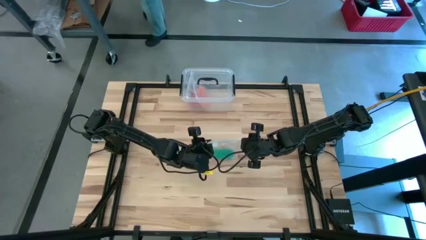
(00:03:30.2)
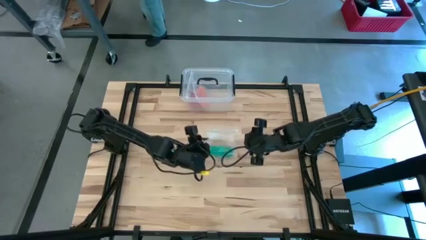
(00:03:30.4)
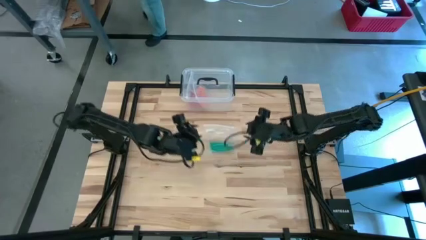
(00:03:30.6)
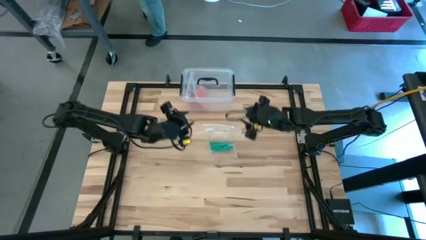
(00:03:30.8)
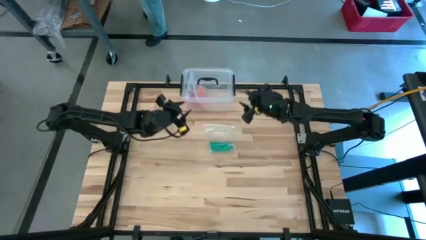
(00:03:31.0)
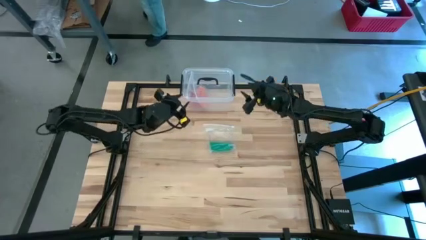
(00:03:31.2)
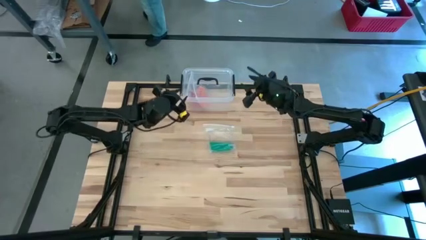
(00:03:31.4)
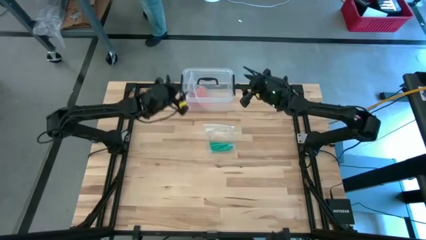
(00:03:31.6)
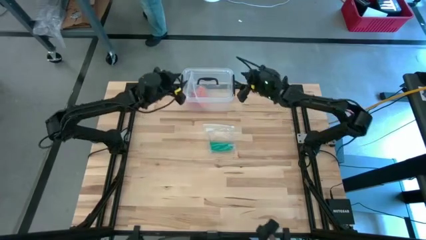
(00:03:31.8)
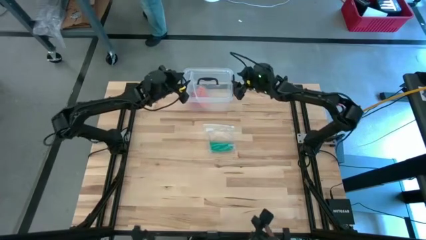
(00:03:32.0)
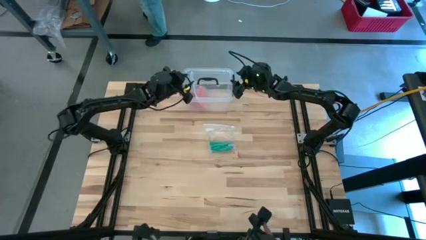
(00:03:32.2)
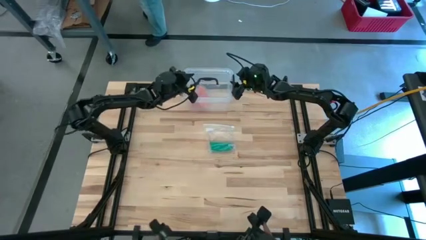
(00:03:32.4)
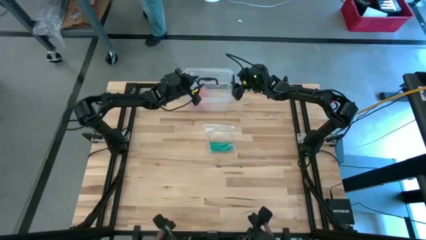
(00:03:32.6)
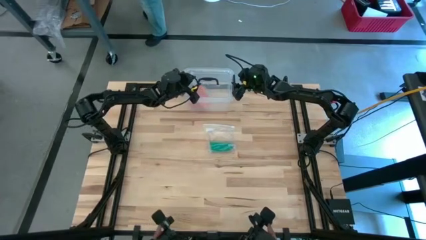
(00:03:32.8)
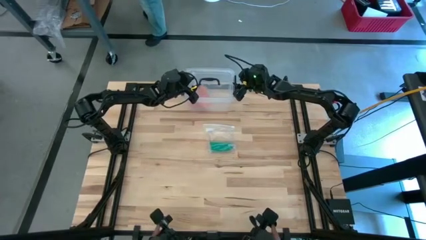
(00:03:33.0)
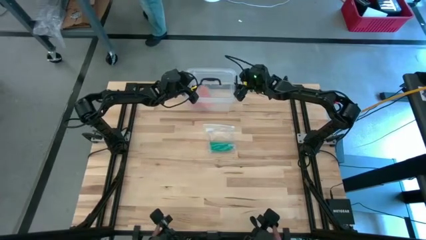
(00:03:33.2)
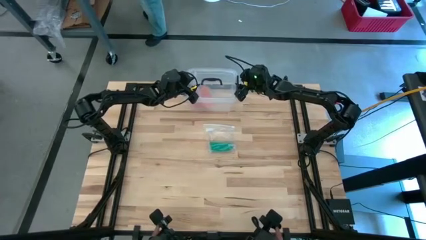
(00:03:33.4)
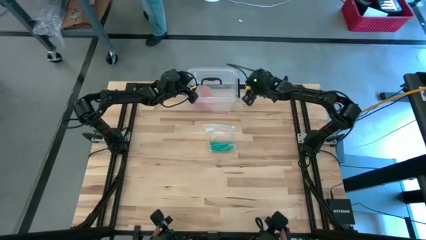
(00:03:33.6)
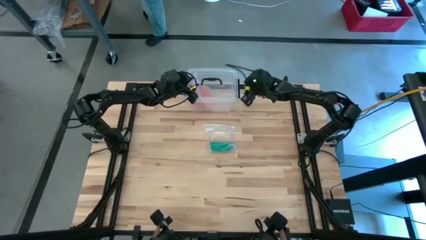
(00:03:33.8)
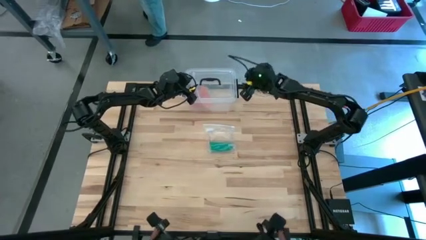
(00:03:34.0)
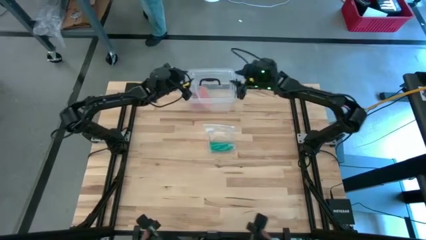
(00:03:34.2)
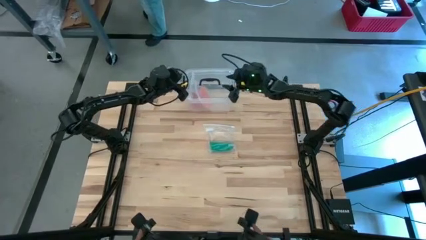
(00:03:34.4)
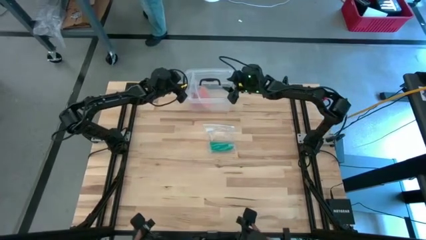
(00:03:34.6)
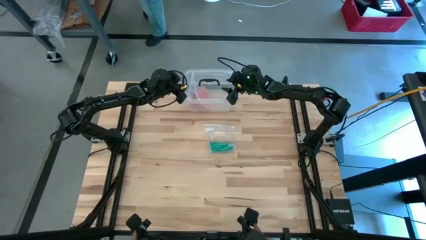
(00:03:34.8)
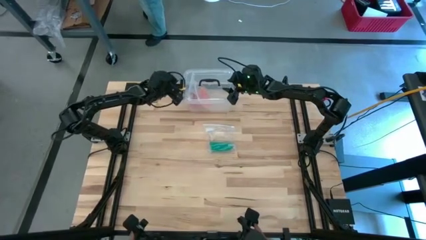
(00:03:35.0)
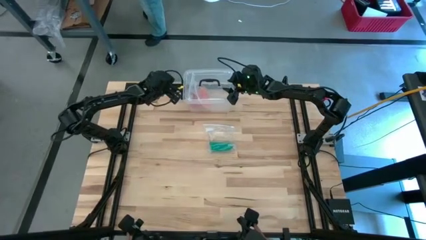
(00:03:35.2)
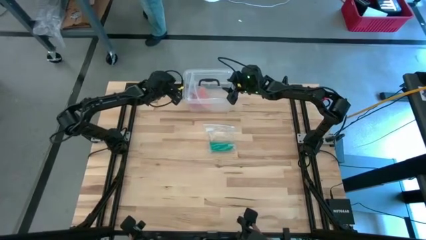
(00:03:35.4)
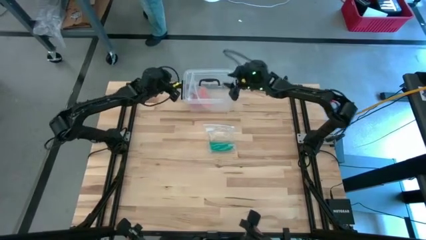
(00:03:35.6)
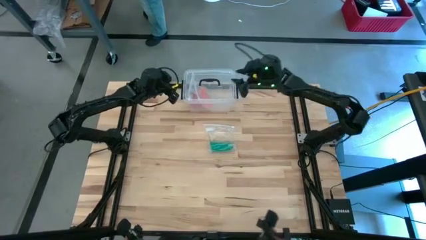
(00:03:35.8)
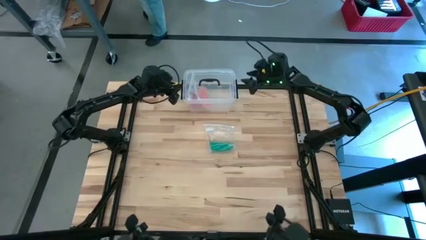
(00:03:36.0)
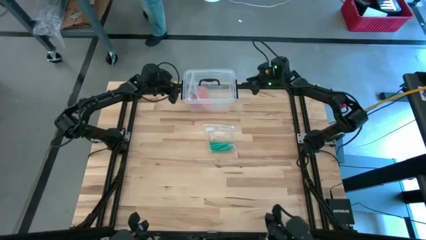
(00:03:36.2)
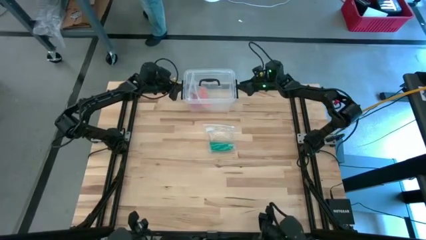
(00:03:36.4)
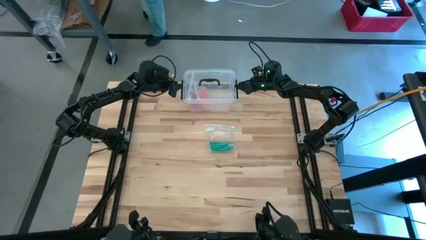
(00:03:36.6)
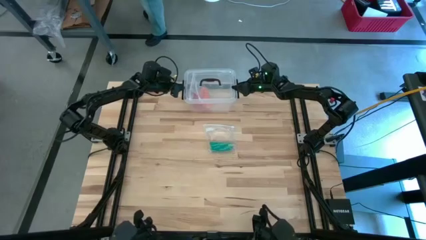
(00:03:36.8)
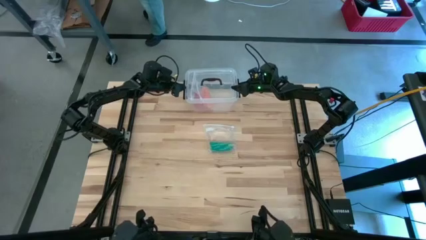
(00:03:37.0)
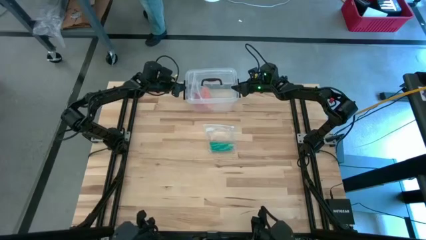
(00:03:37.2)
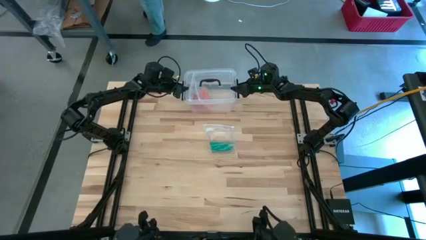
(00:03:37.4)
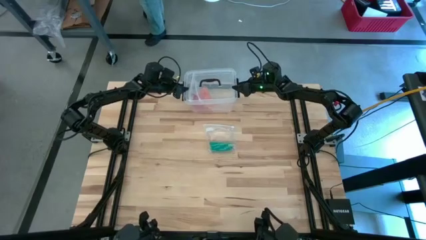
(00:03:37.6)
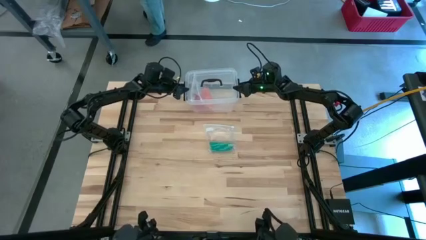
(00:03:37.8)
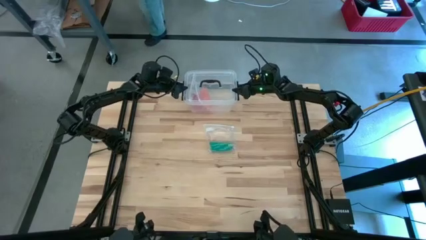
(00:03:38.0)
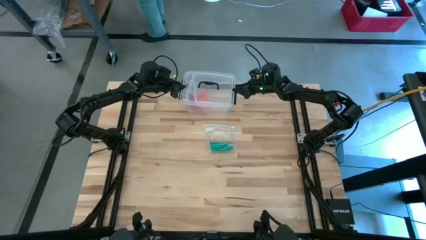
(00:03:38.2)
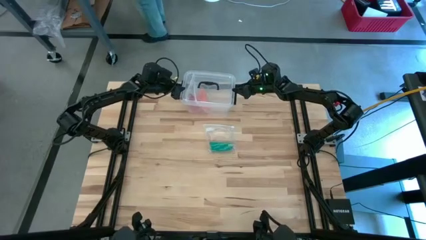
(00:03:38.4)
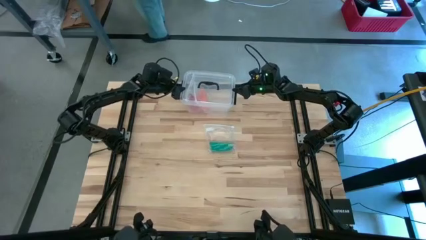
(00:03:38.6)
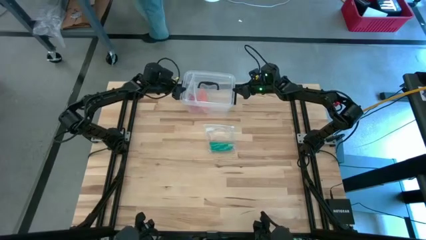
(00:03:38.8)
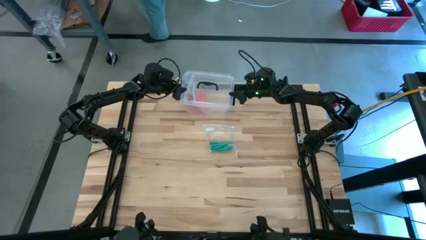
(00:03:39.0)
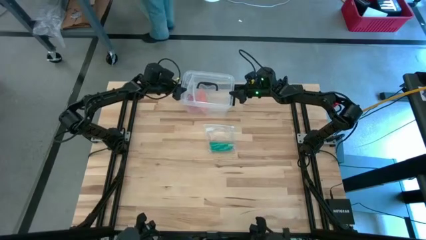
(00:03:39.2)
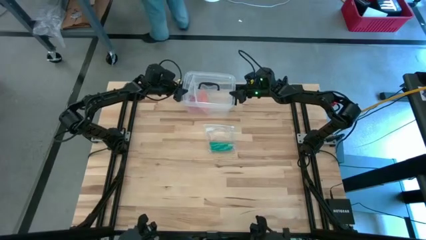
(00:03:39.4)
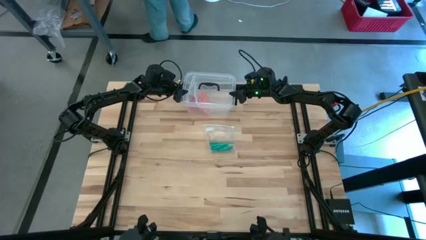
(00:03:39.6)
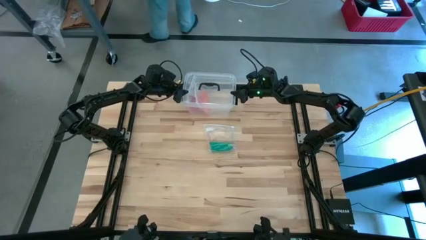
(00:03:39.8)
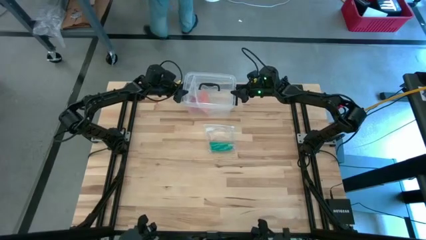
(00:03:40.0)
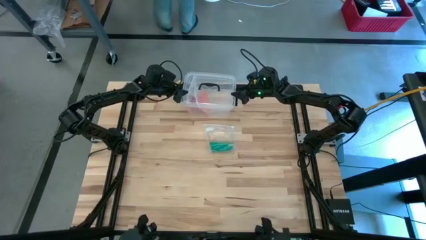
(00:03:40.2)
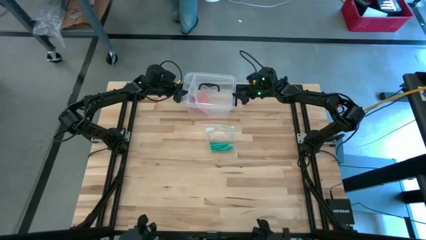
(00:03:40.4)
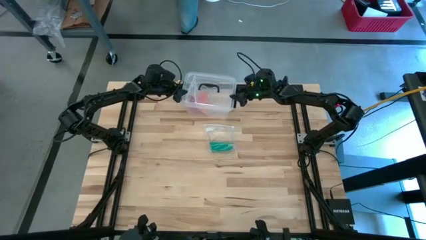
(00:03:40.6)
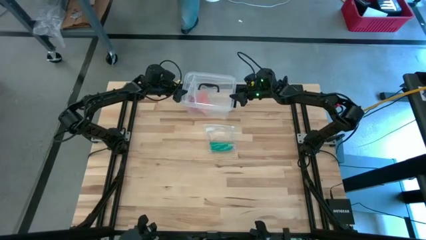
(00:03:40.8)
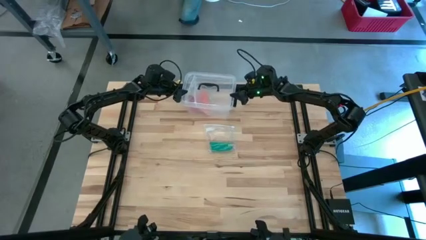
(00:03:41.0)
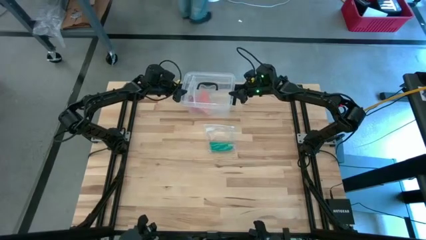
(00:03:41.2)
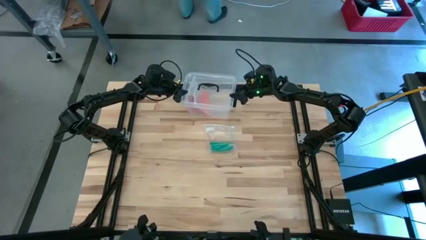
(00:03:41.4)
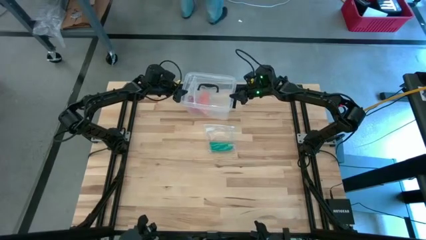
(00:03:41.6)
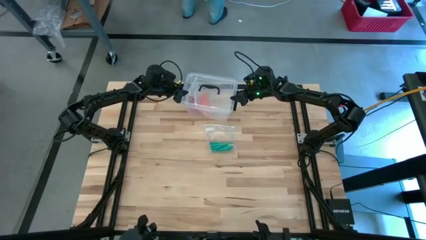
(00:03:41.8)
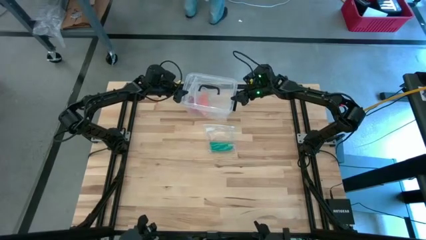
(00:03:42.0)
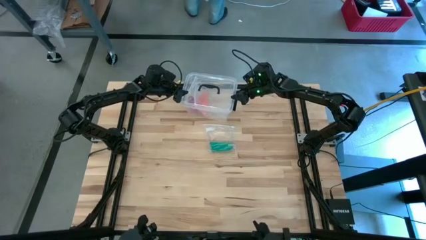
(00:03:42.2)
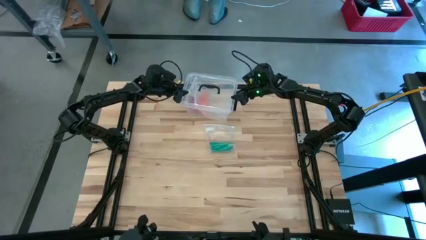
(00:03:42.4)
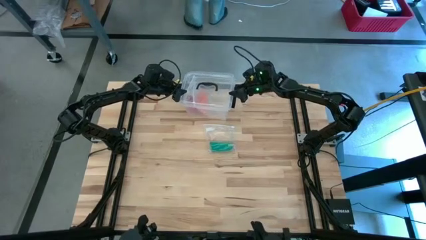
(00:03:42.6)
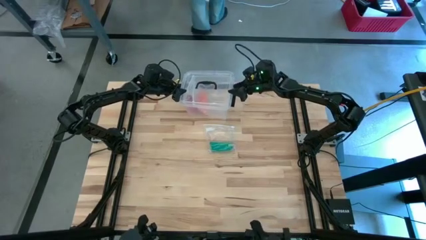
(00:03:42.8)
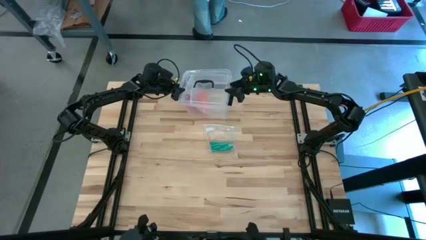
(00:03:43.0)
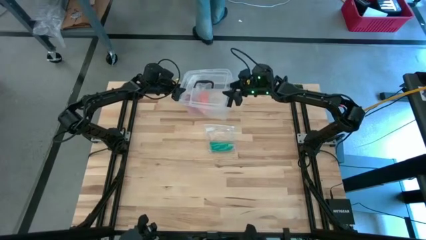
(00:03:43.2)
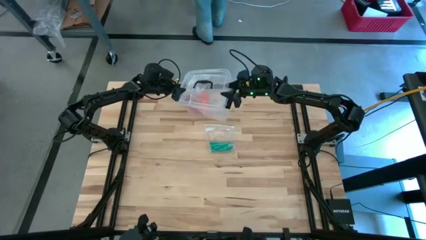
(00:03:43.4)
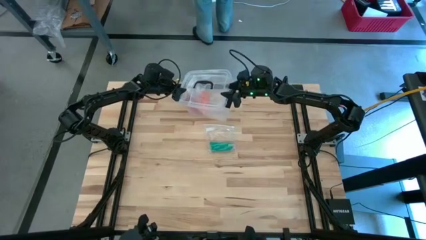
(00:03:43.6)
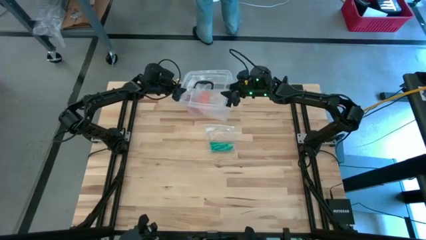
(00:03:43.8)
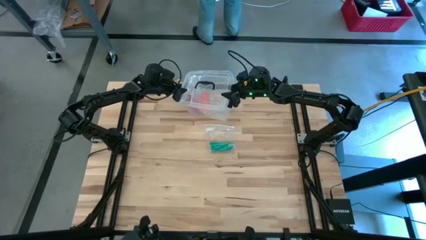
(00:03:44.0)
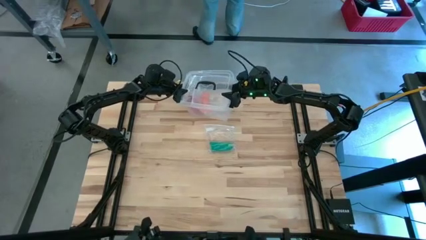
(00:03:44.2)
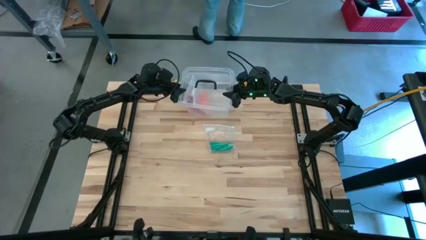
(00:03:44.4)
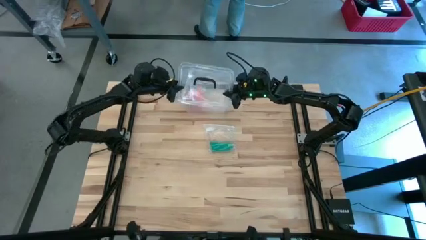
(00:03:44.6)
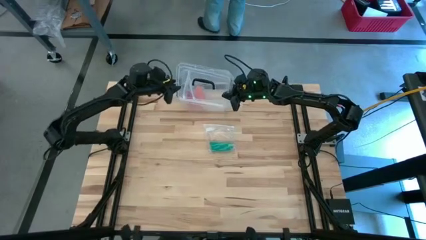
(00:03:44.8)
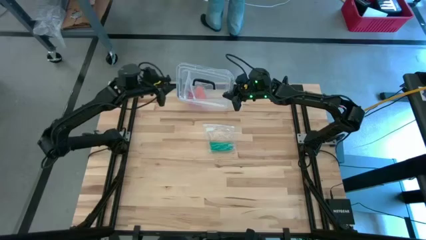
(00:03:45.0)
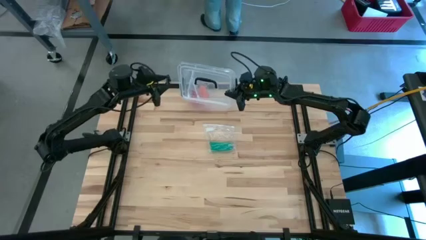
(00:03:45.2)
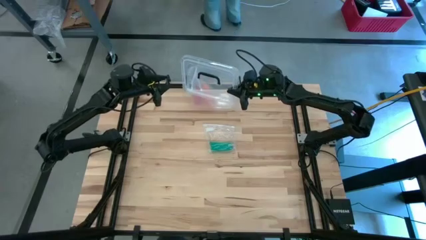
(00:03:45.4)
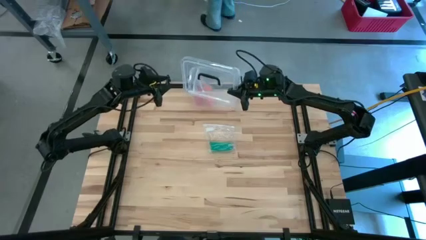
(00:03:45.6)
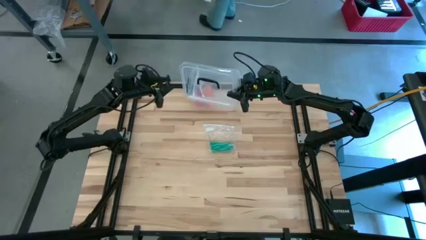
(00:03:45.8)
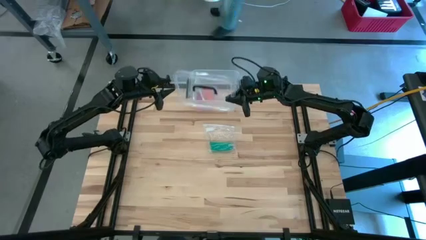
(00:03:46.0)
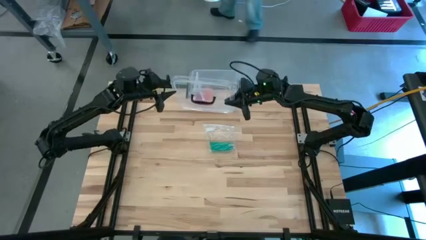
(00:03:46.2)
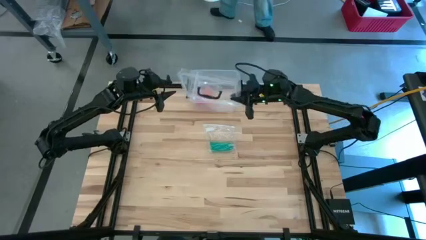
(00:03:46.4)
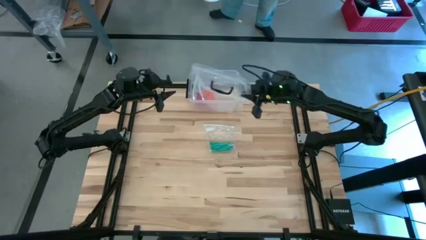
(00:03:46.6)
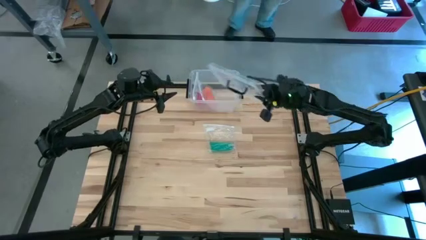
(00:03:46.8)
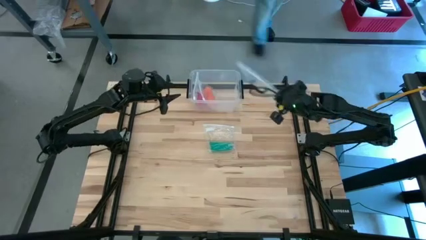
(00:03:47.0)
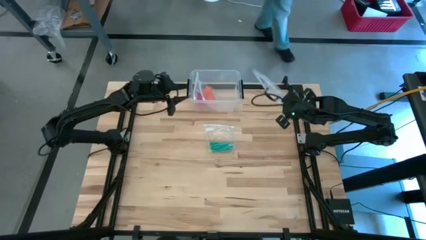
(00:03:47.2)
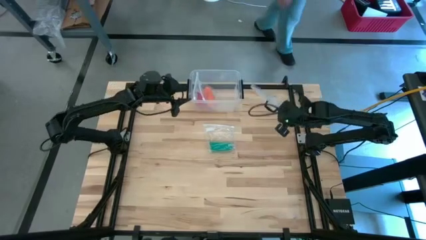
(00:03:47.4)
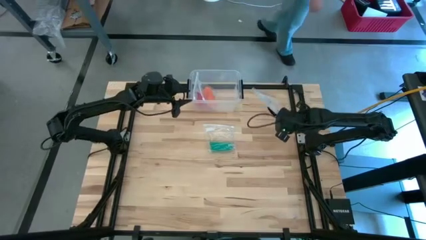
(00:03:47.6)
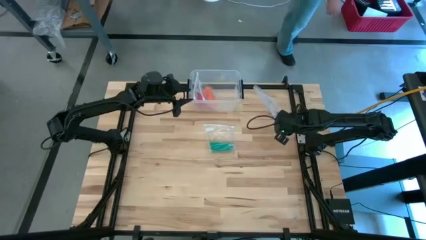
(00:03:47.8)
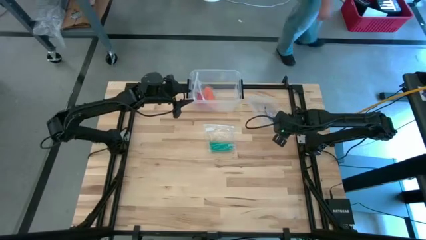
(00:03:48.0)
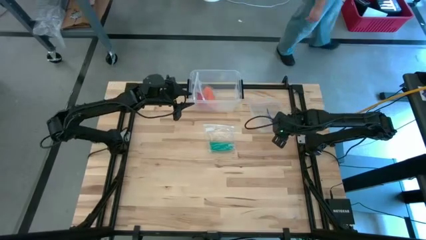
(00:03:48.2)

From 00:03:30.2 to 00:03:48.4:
Task: Roll bandage
Open the transparent bin
